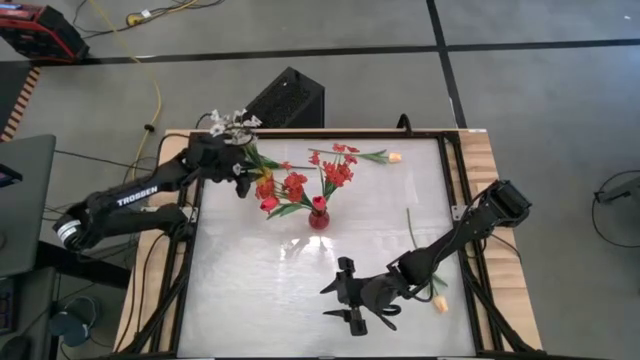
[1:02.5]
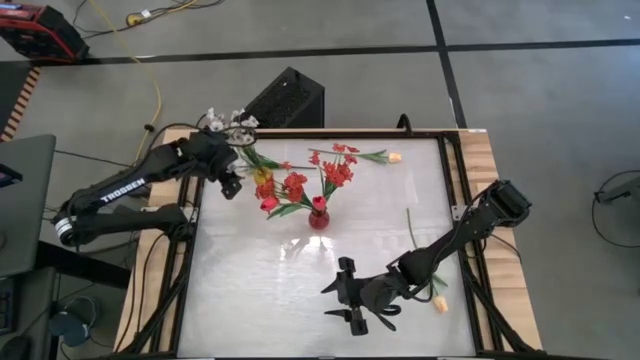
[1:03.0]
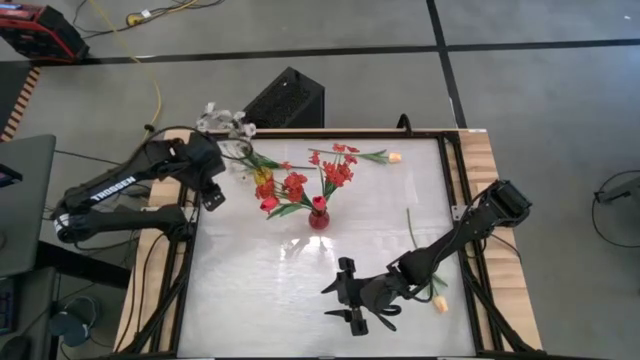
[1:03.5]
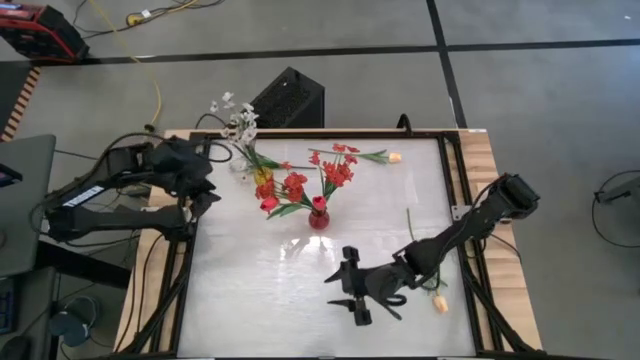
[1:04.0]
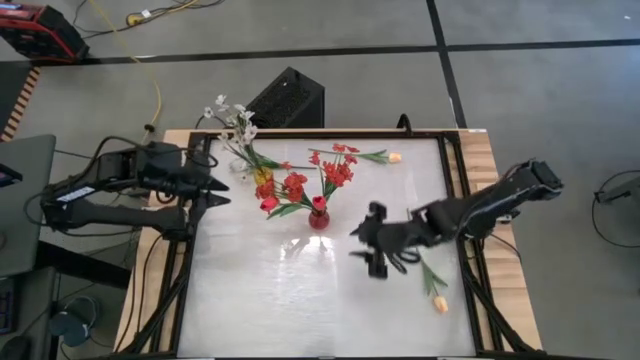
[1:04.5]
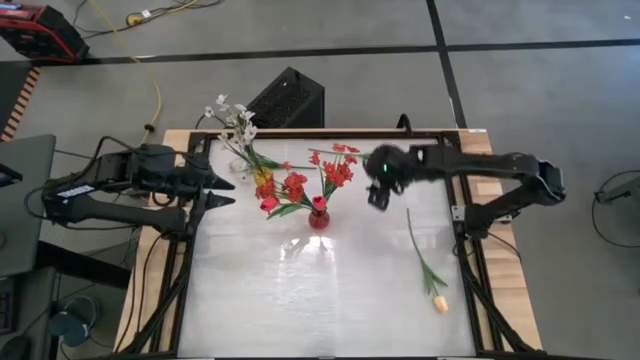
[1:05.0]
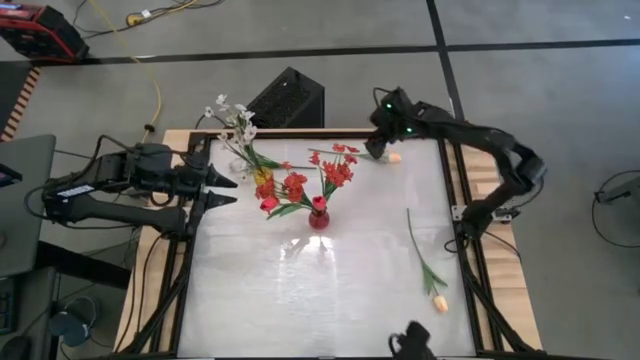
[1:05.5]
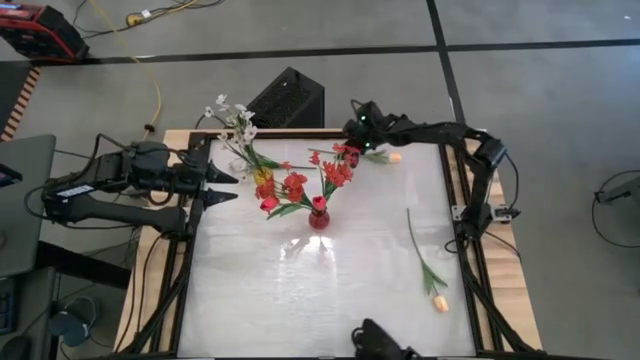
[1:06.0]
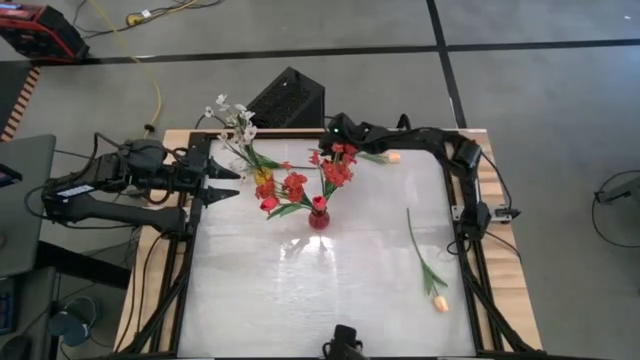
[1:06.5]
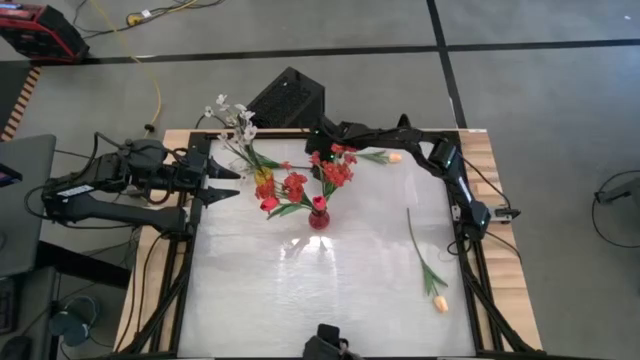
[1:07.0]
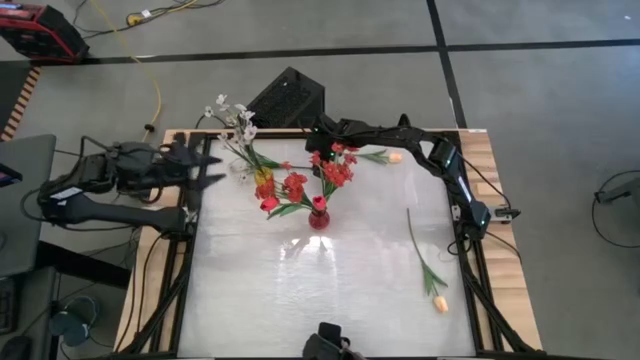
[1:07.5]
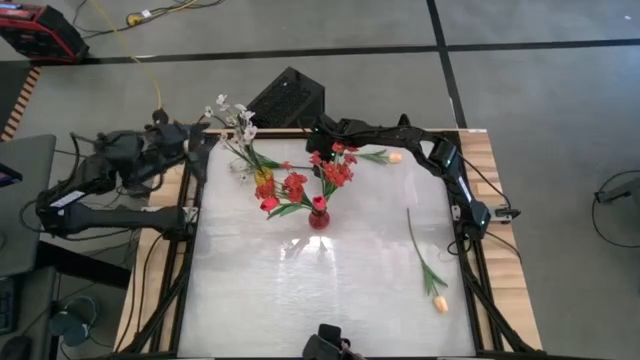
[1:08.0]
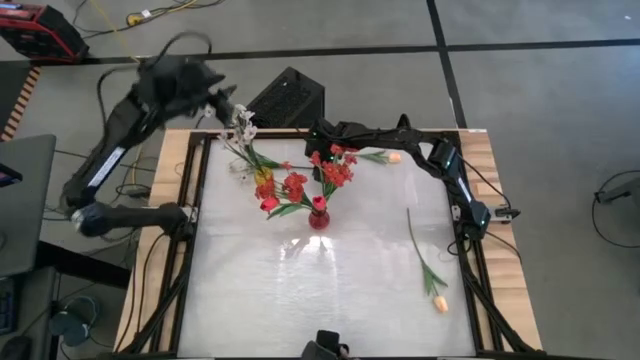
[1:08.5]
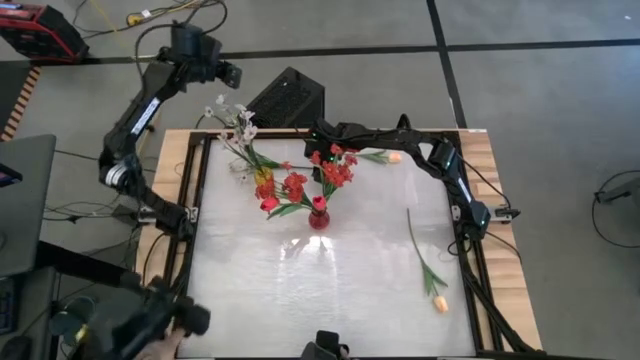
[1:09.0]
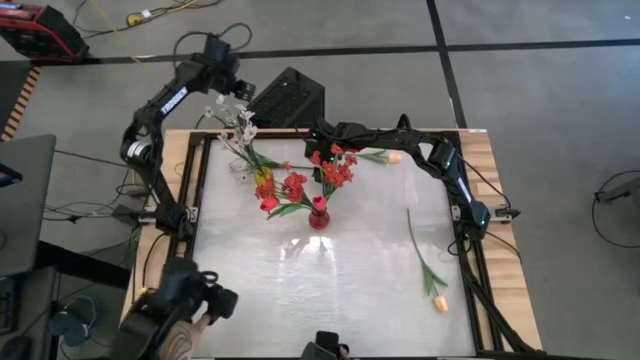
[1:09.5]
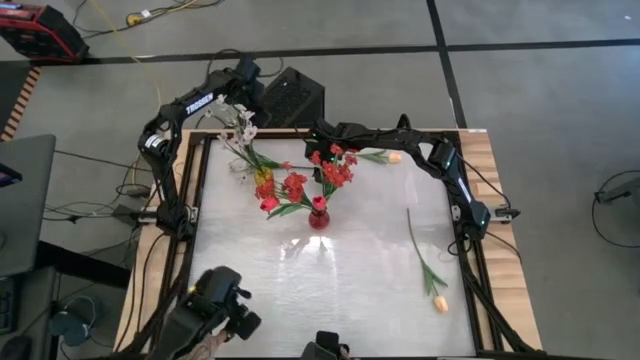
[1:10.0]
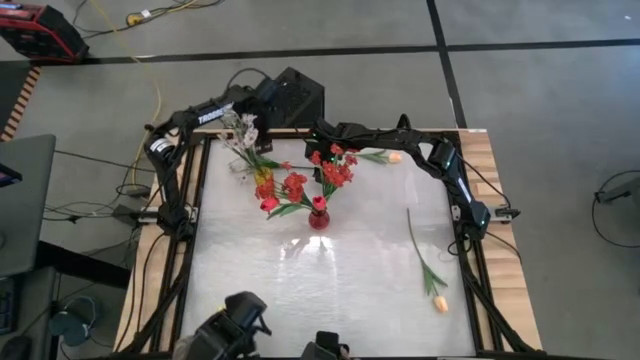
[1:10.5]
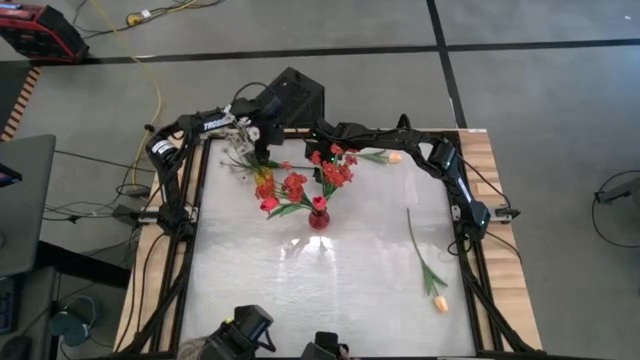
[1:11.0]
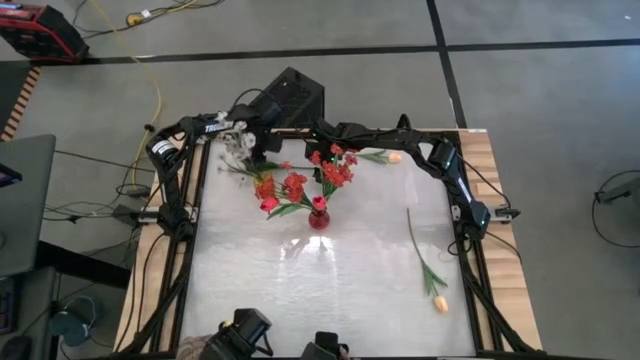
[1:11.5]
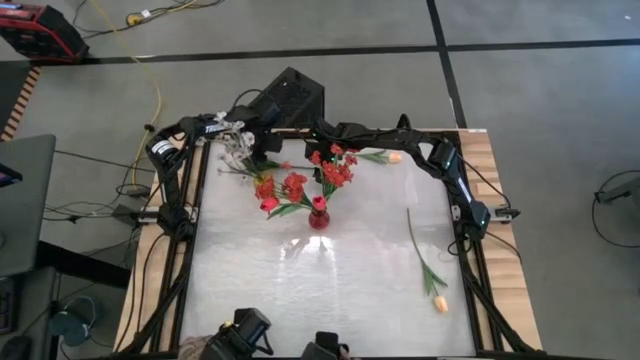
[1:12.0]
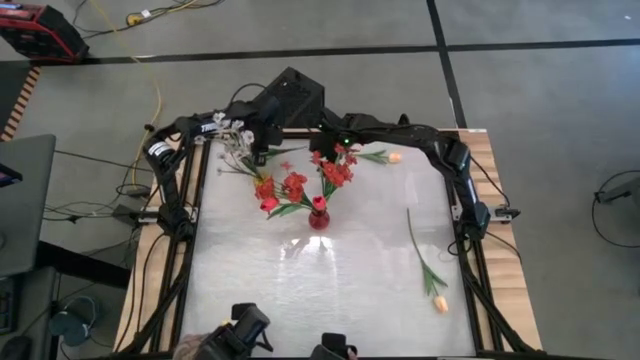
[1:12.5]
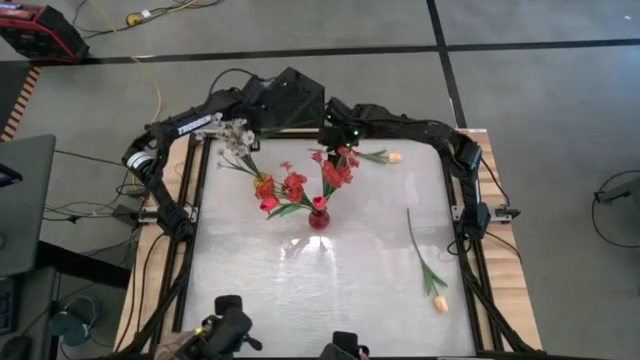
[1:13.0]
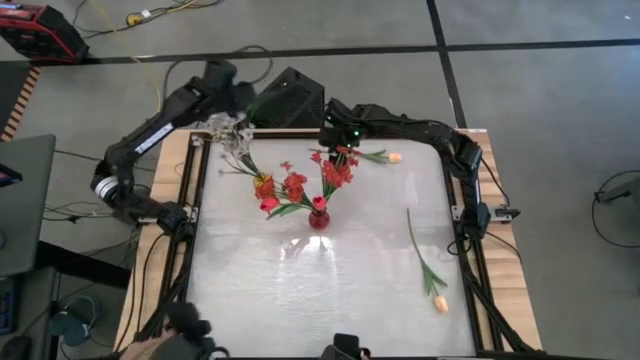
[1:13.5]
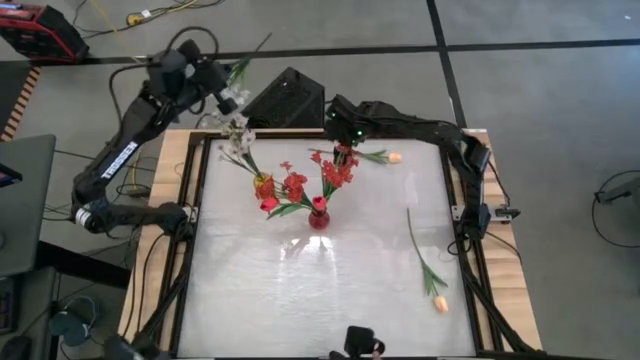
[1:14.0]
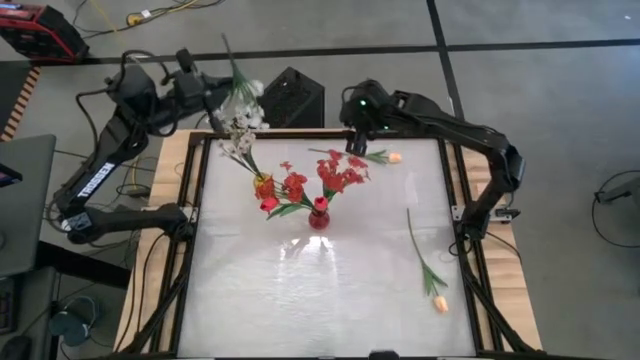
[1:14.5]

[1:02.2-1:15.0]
Task: Sort flowers into vase by color
Put the white flowers into the yellow vase

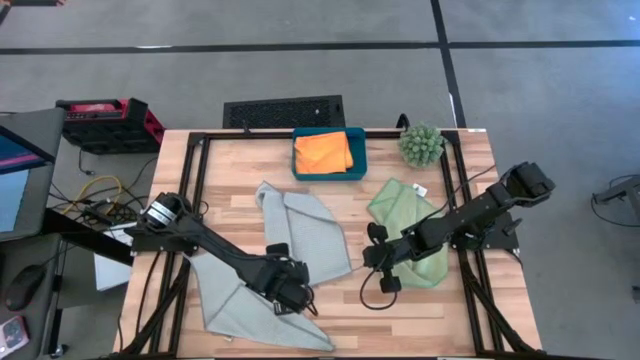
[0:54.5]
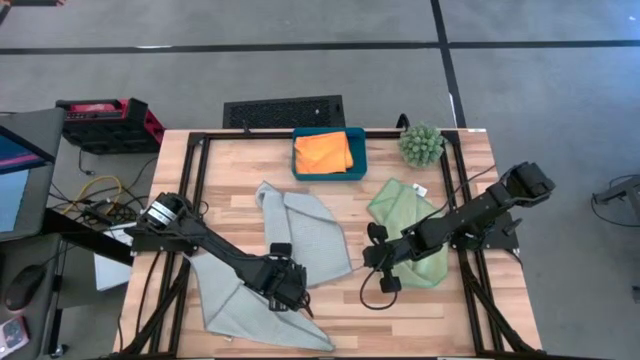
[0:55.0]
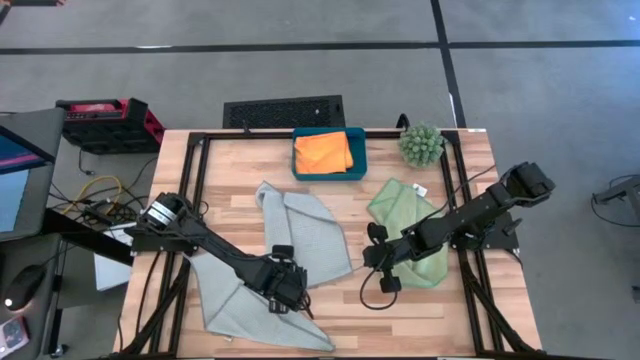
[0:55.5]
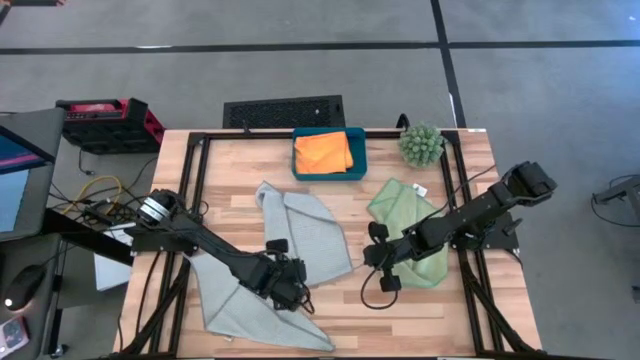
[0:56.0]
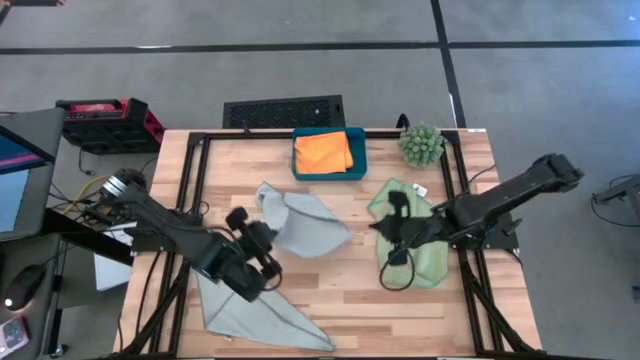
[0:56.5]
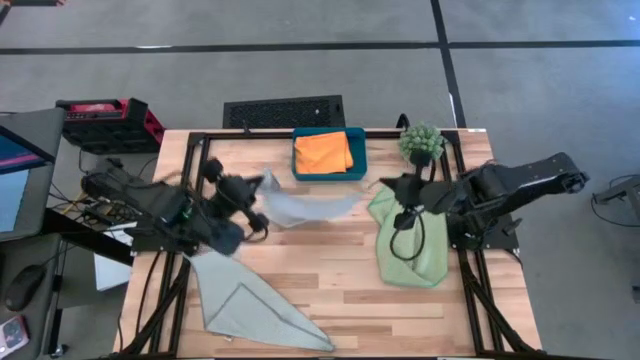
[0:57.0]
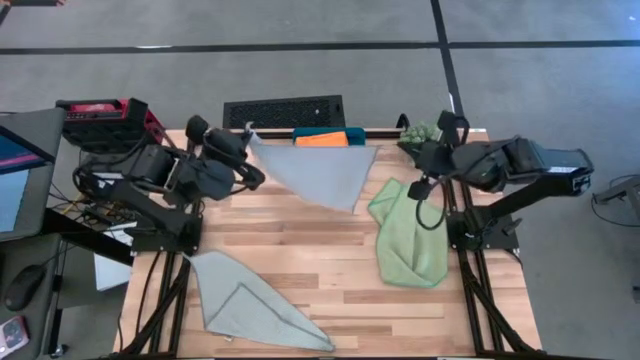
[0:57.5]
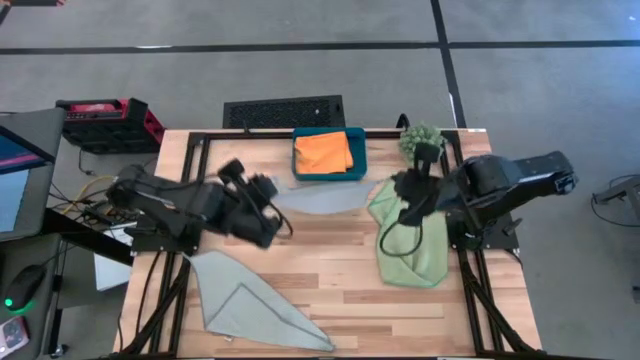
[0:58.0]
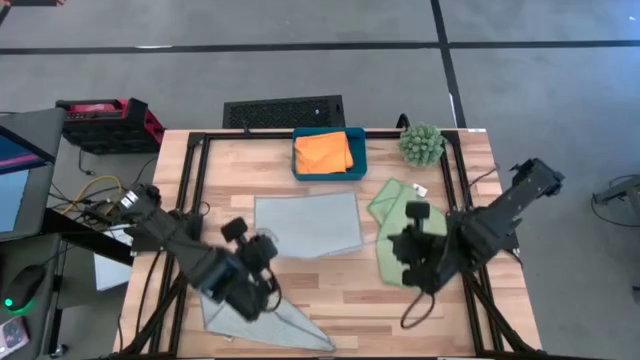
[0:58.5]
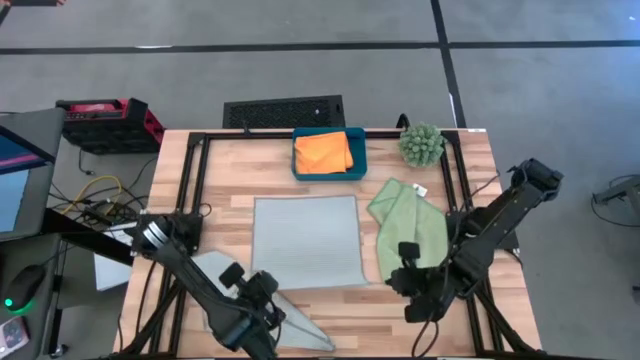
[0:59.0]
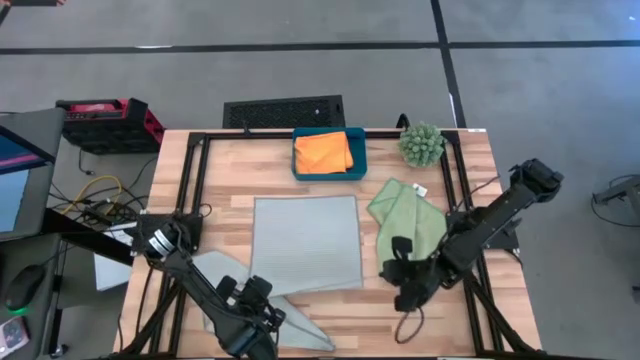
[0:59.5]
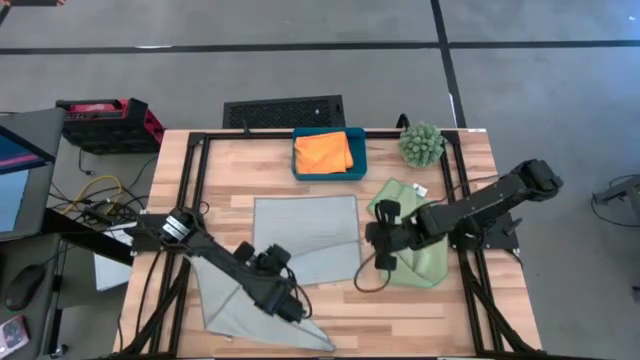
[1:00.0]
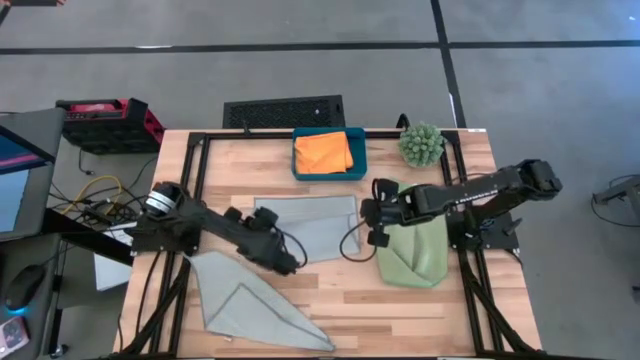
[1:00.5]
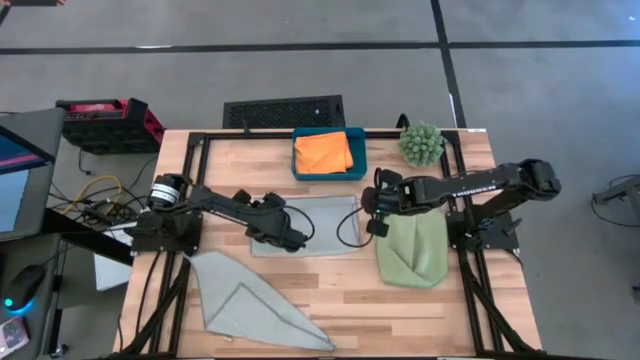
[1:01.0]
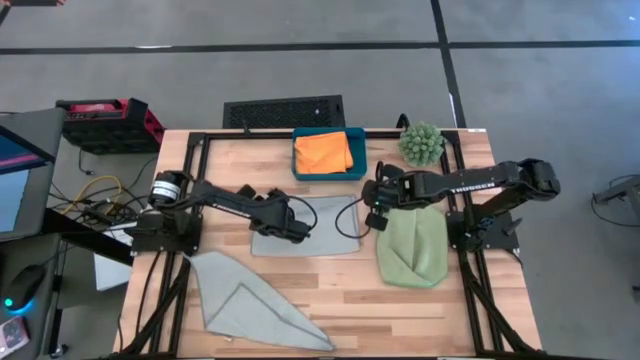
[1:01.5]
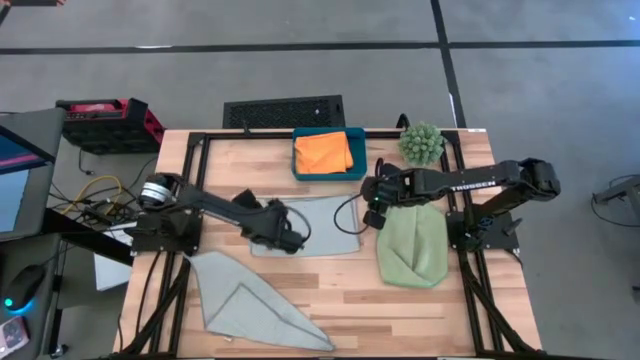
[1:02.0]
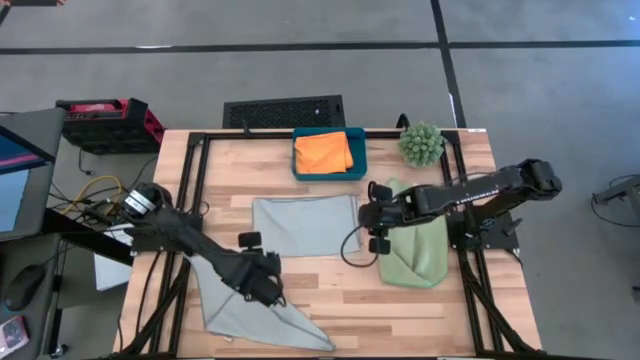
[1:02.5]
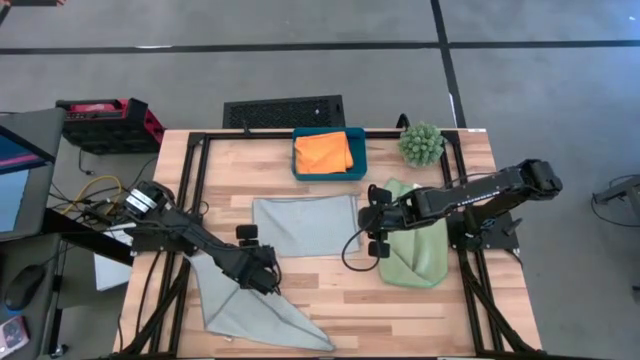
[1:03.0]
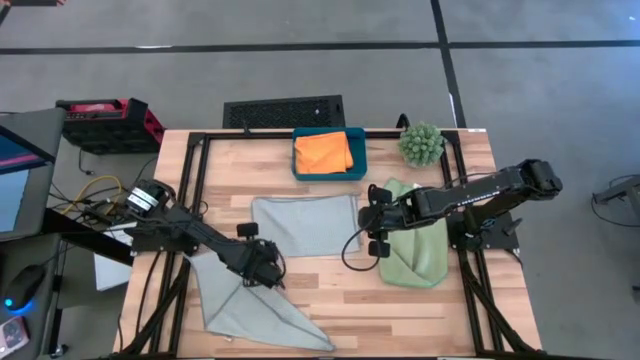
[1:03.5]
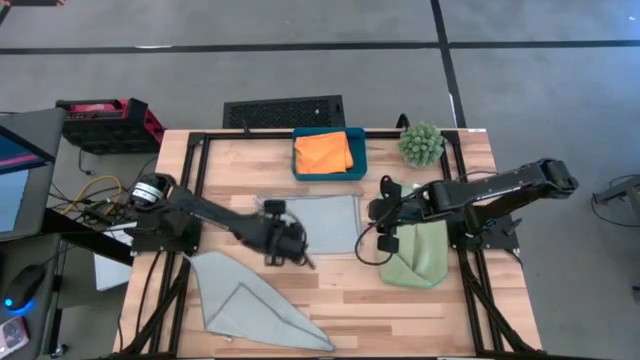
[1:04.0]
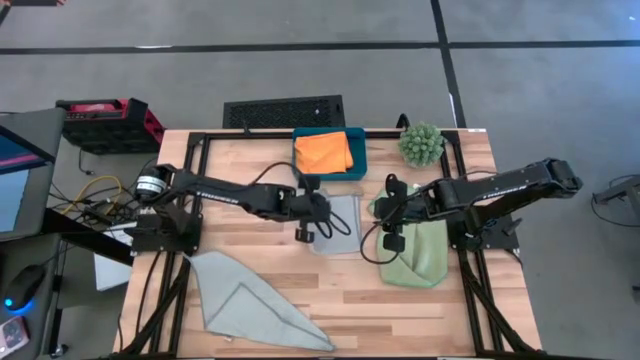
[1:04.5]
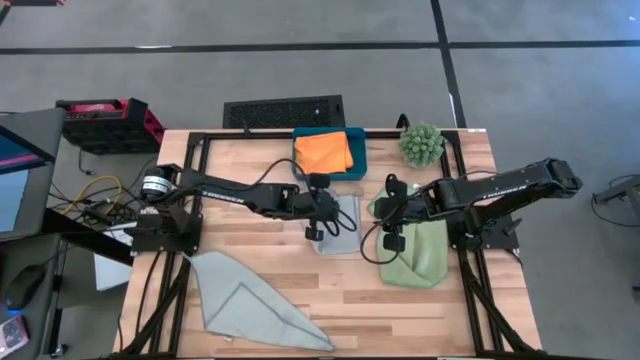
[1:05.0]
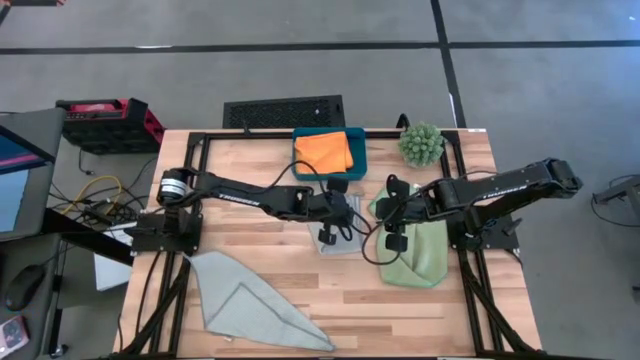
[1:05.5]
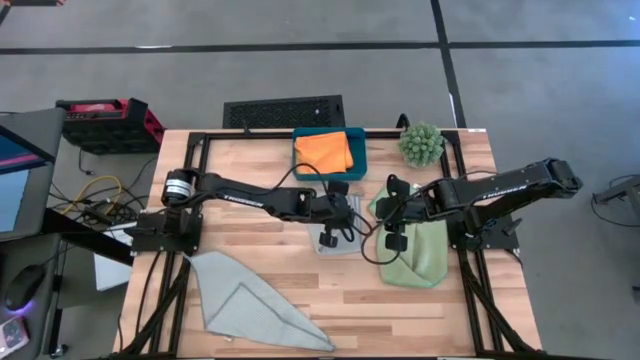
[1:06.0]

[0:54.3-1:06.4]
Task: Fold microfiber towels
Fold the top gray microfiber cloth
